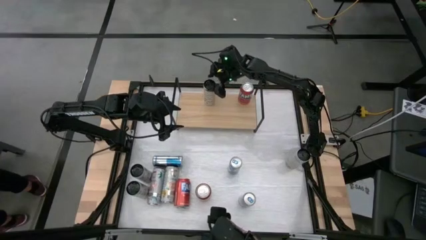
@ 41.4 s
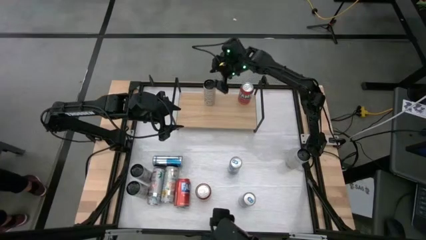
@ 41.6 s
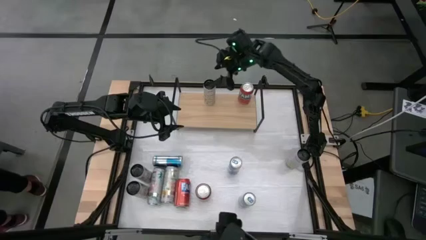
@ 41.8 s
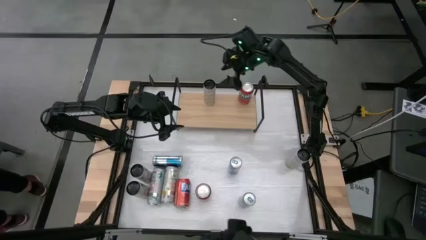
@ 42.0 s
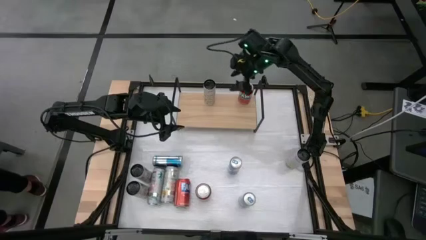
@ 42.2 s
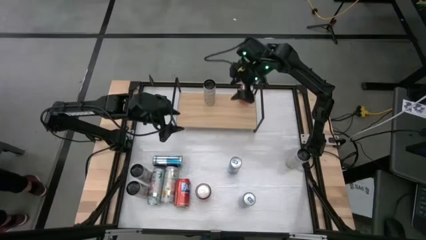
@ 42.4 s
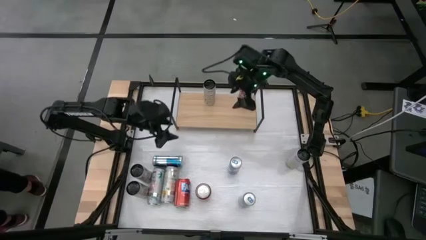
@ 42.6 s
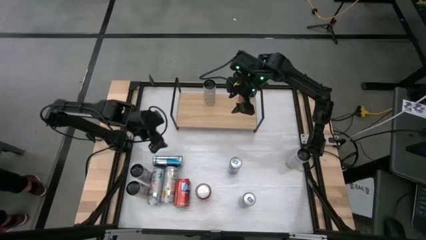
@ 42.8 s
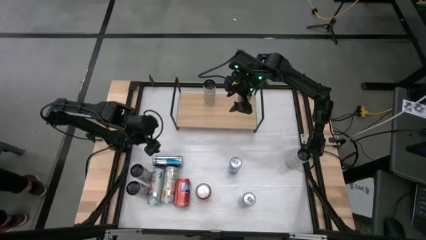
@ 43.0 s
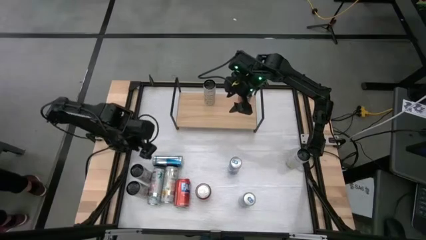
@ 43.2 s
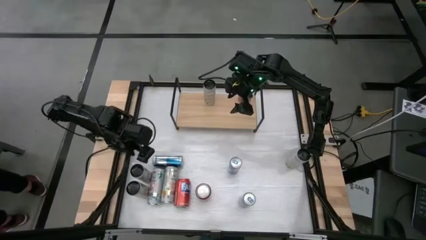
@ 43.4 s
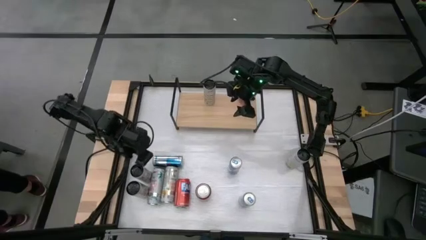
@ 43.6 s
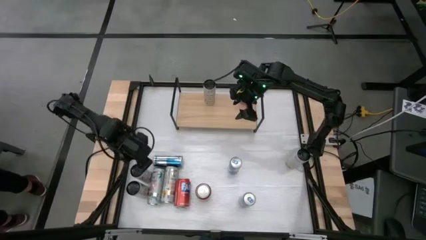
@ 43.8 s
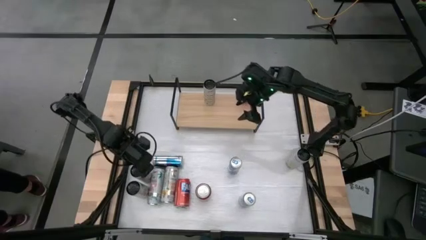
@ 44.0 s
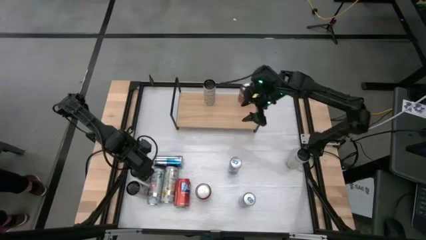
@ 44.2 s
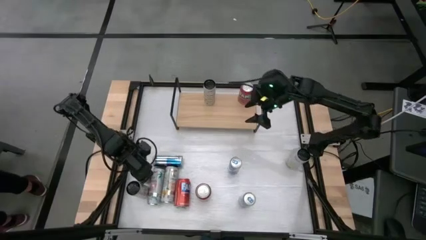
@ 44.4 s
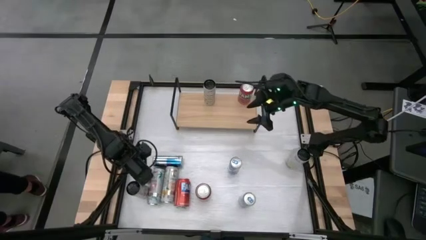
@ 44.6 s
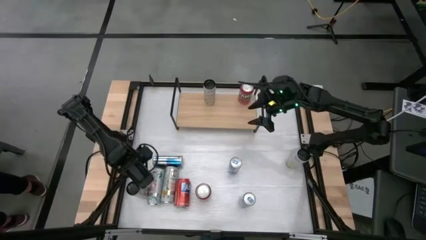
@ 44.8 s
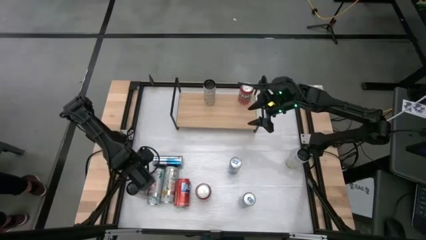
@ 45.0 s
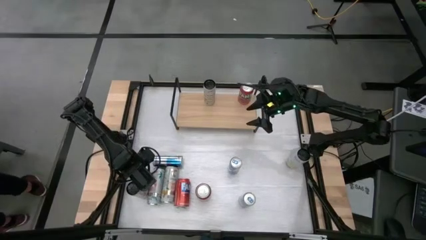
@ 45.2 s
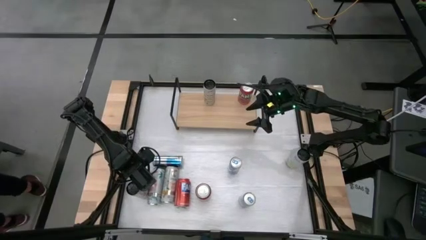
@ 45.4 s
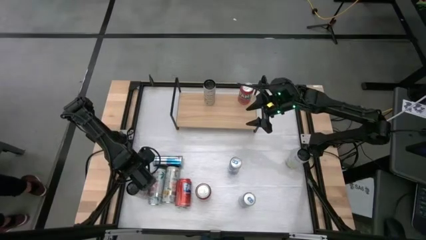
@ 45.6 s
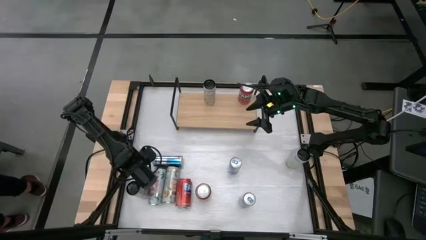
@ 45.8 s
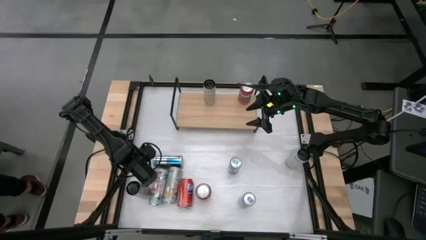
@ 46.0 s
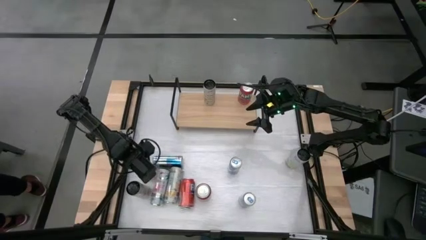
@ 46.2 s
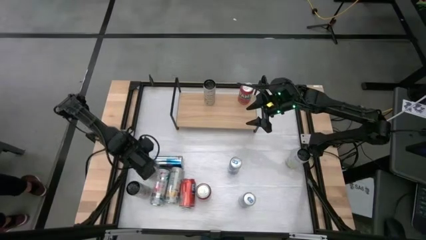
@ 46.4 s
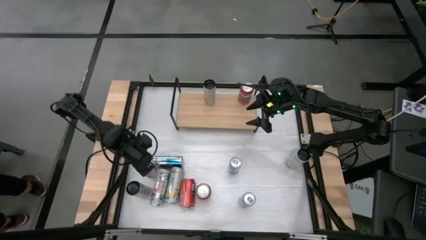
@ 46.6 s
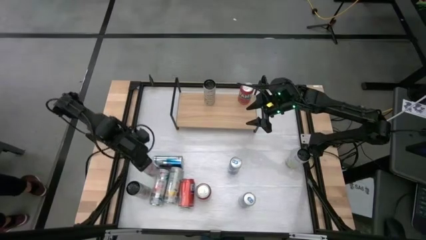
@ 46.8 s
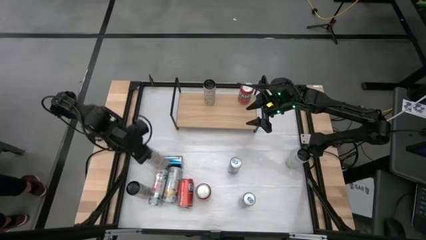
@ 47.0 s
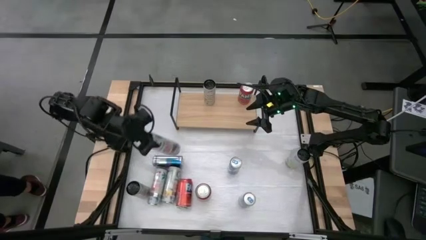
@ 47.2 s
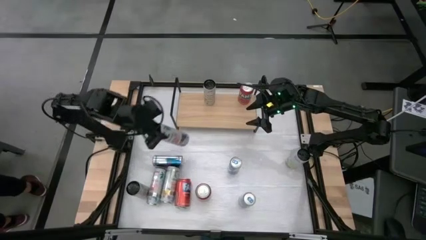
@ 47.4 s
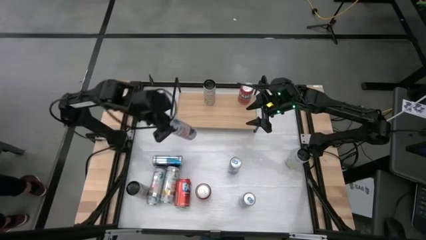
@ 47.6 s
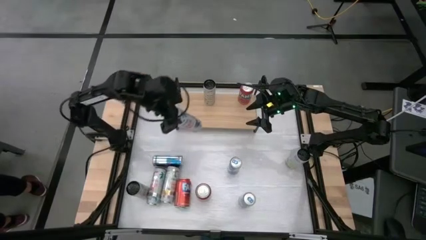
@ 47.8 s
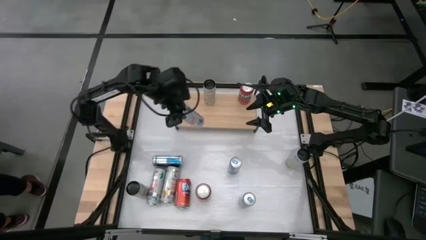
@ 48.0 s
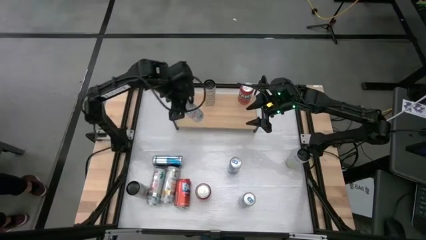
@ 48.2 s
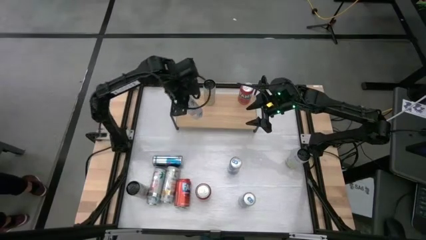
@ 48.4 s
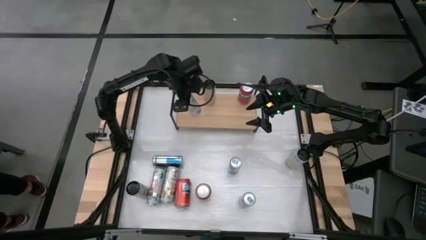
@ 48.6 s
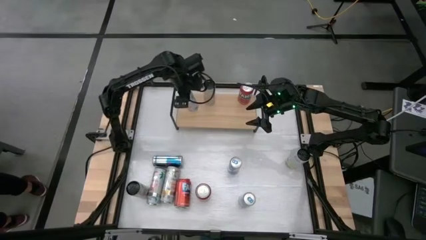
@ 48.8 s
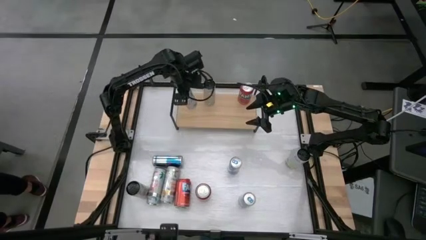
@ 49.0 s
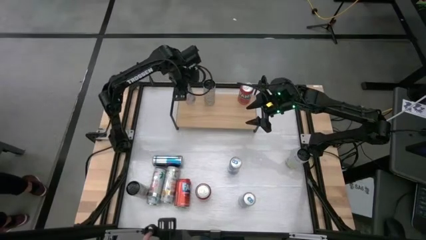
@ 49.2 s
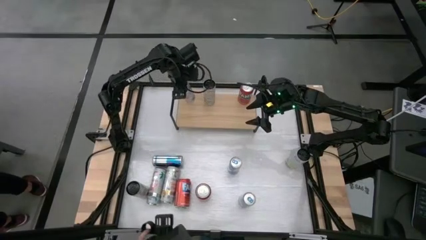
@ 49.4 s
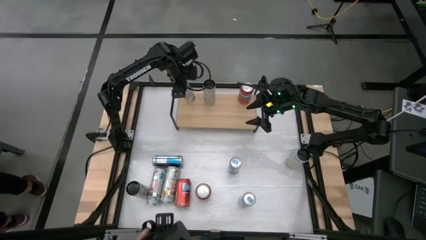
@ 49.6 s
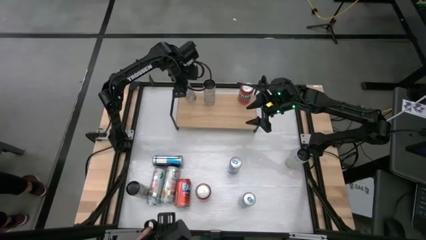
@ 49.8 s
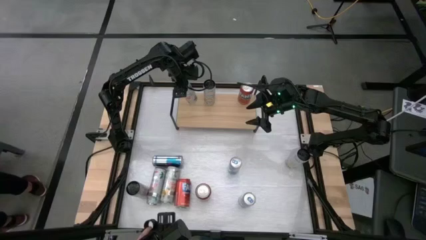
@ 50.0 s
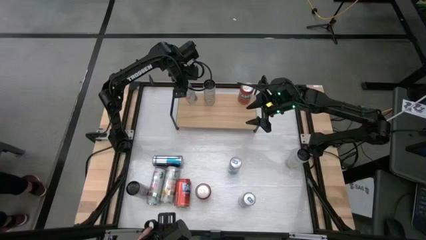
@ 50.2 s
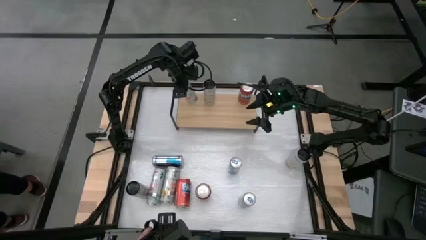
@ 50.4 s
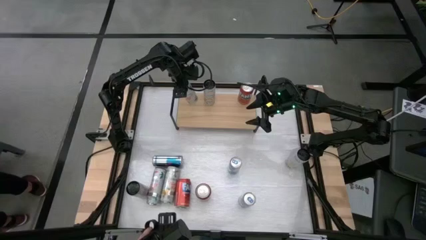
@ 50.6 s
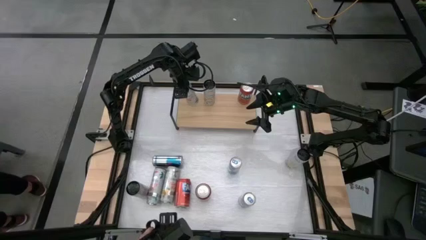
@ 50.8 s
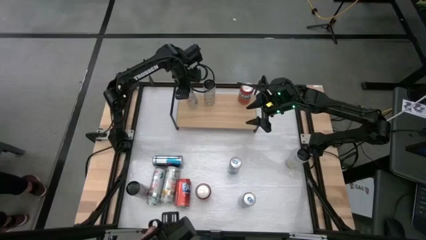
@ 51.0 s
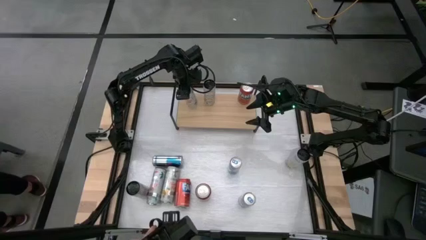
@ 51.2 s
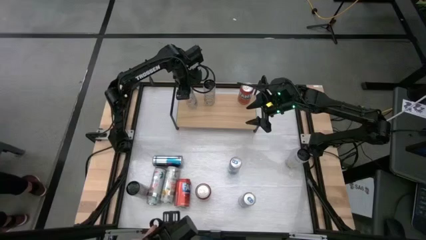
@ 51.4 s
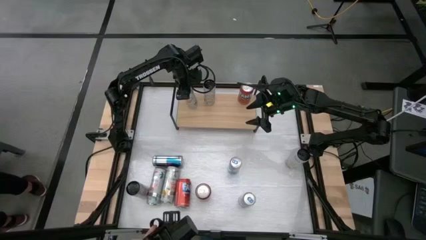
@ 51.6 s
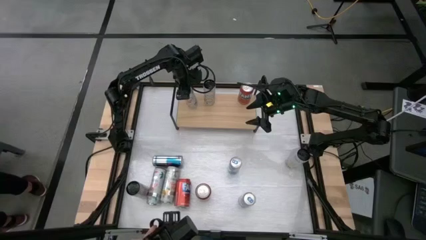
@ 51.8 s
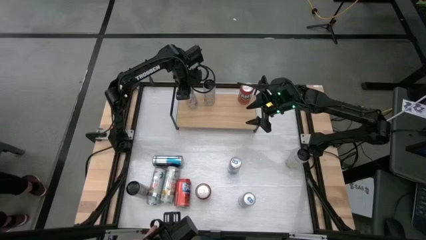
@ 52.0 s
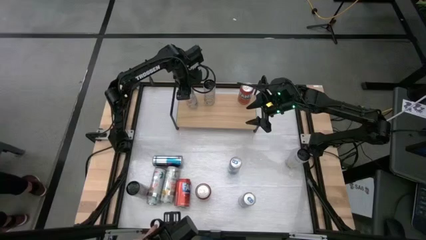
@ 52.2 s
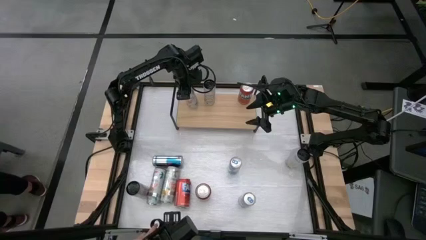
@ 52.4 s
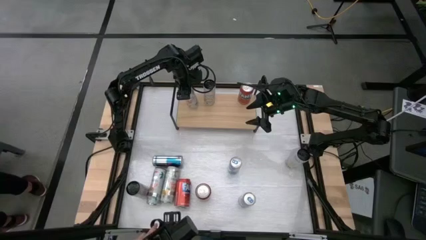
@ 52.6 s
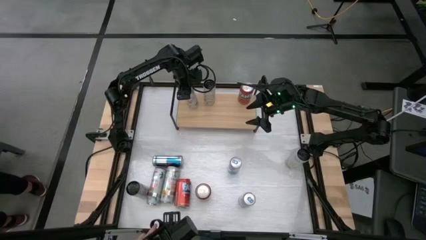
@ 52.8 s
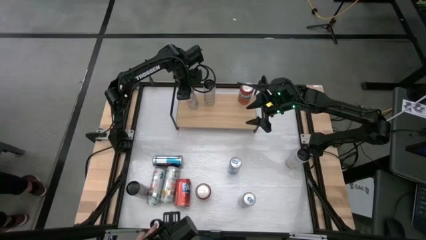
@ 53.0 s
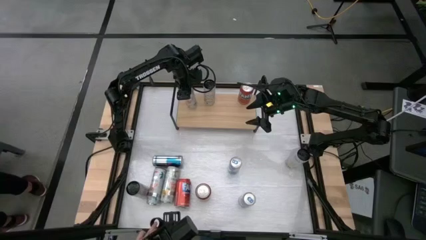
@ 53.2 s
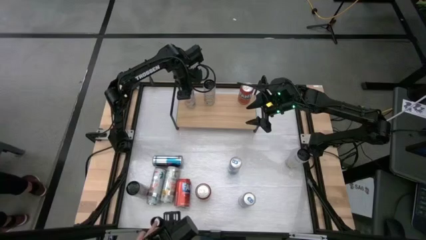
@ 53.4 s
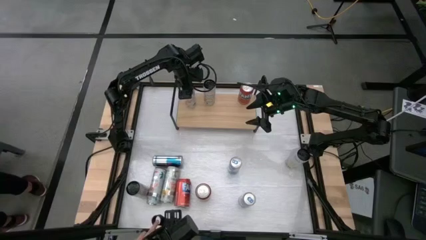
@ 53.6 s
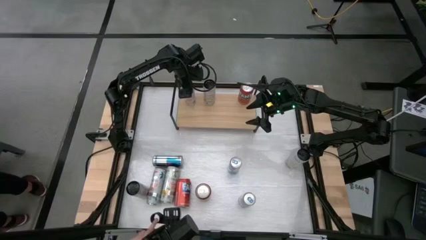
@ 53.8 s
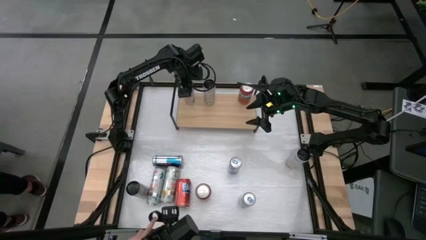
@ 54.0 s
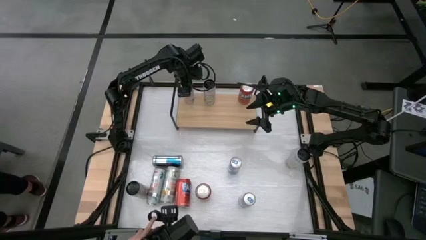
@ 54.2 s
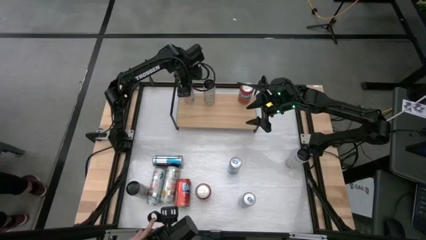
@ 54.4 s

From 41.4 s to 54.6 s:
Task: Place canned beverage on shelf
Put the top white pink soda can on the shelf

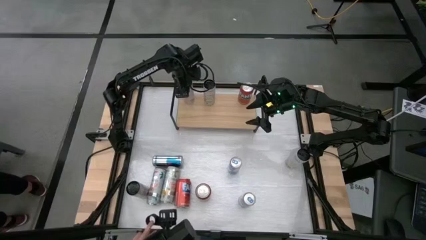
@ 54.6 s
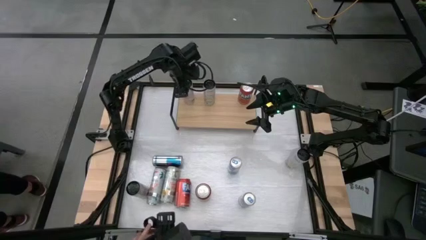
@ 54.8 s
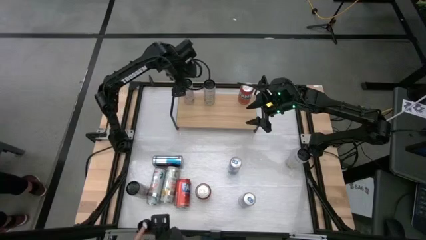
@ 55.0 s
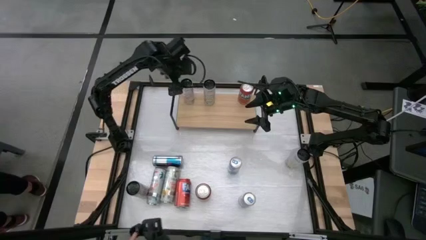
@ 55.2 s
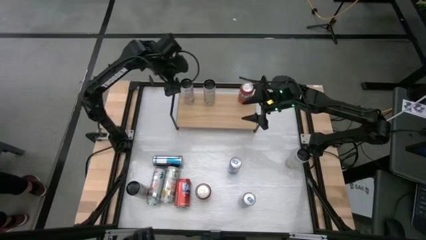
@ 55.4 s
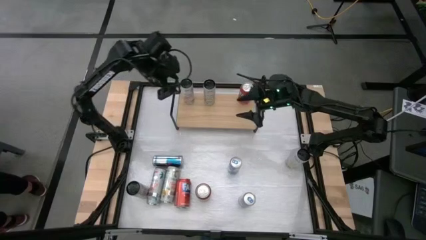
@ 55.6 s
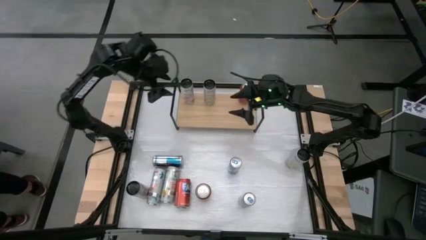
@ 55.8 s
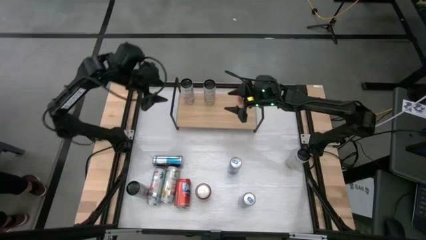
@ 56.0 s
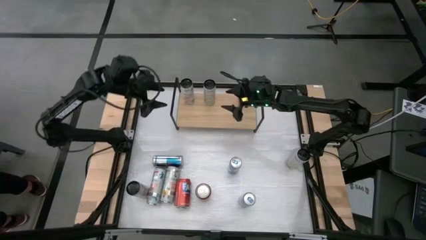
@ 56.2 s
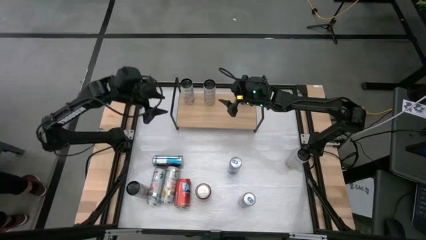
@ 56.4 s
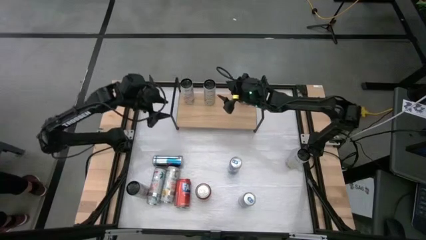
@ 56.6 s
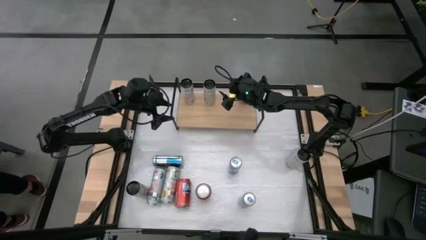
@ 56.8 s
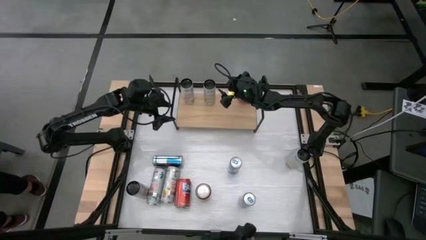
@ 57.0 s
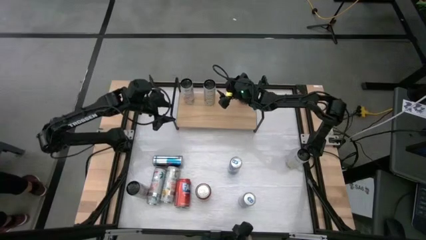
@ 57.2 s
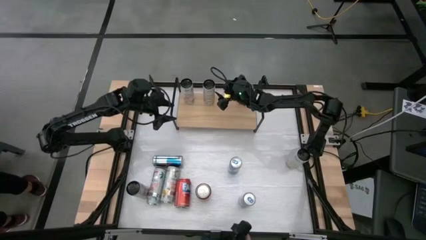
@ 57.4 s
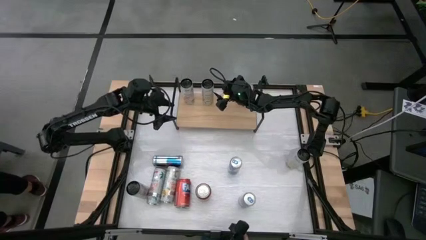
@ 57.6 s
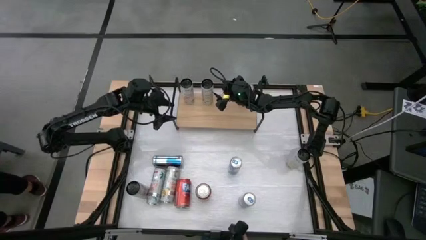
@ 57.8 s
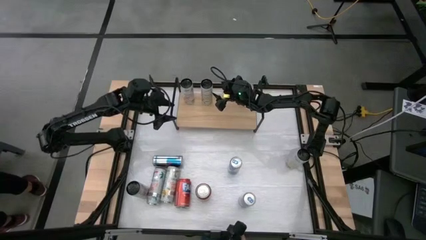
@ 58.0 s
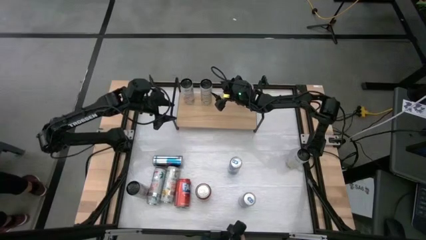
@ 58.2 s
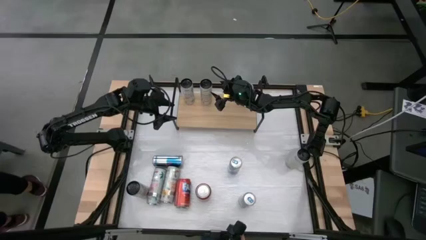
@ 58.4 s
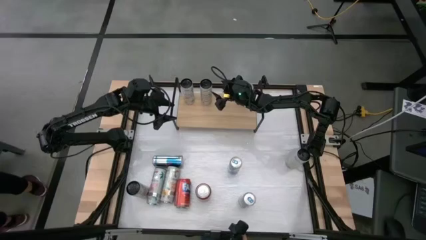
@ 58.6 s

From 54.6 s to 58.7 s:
Adjust the white yellow soda can on the shelf
